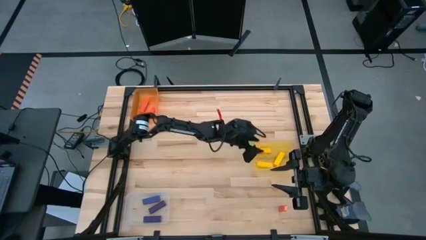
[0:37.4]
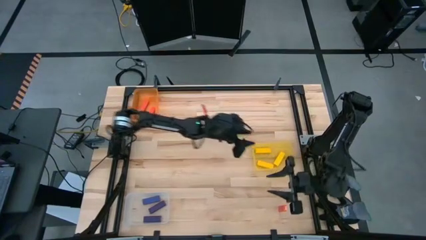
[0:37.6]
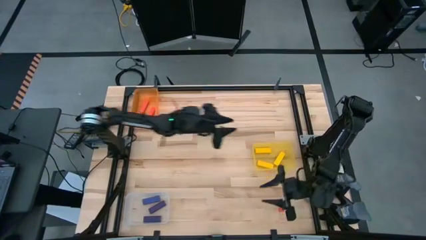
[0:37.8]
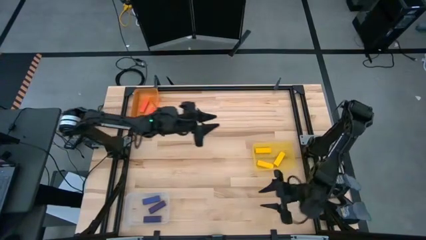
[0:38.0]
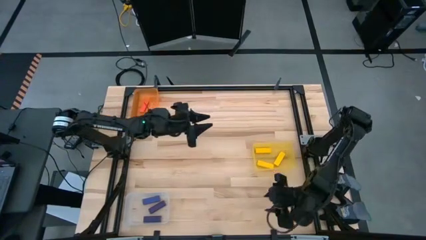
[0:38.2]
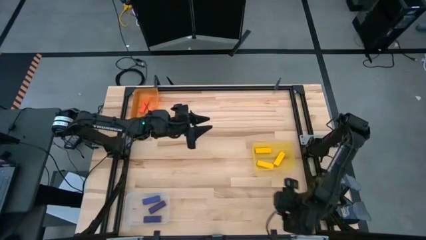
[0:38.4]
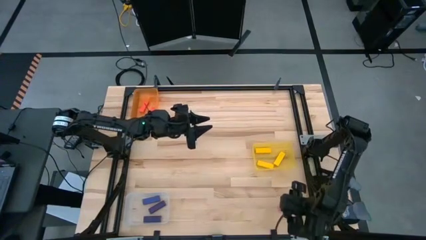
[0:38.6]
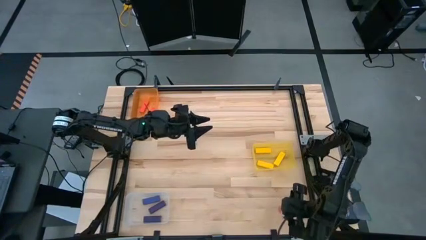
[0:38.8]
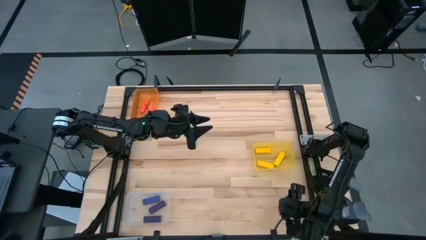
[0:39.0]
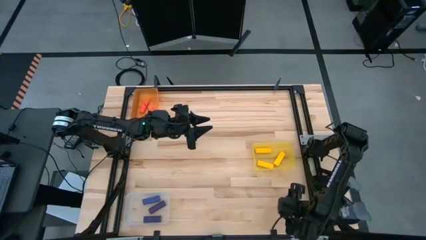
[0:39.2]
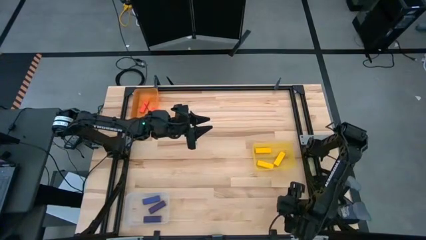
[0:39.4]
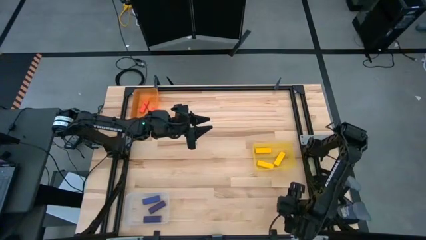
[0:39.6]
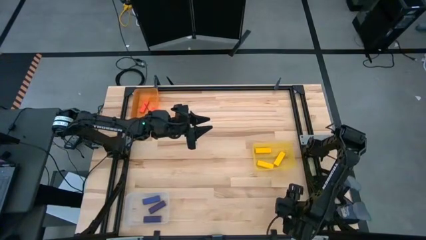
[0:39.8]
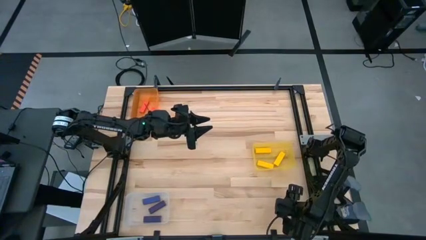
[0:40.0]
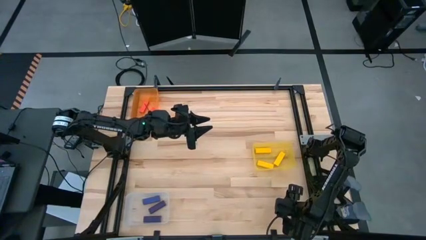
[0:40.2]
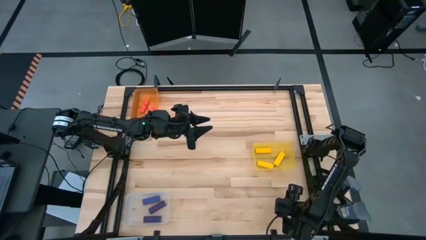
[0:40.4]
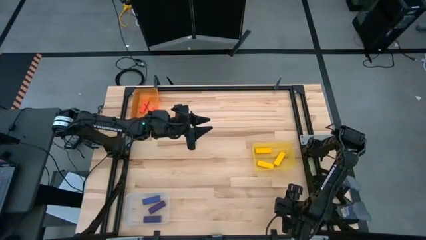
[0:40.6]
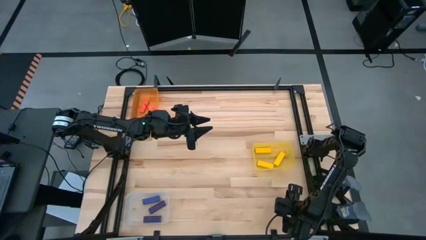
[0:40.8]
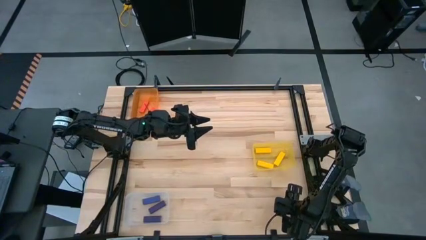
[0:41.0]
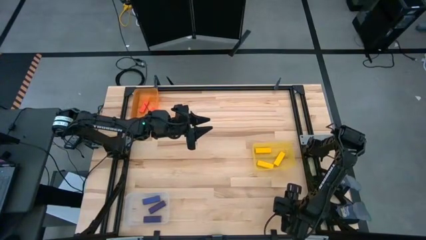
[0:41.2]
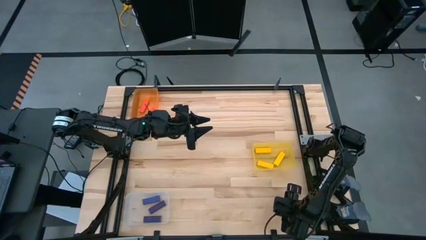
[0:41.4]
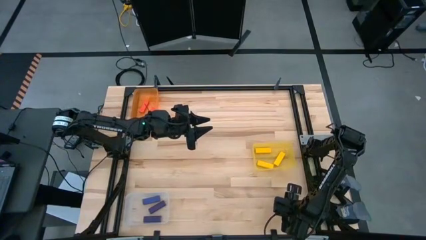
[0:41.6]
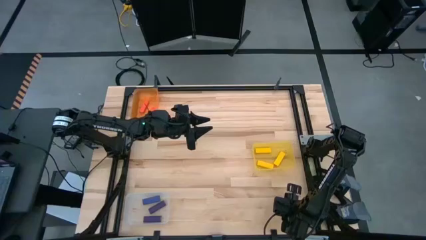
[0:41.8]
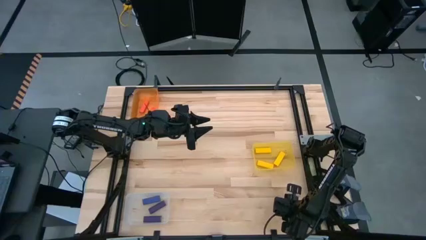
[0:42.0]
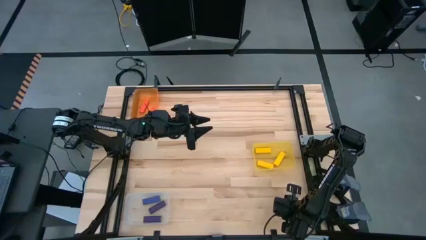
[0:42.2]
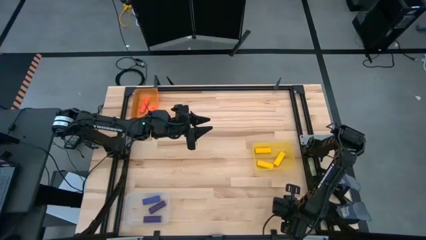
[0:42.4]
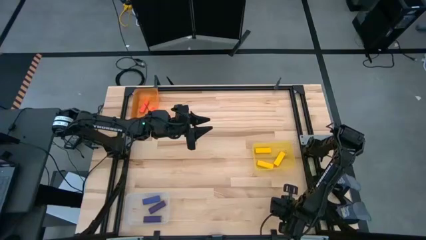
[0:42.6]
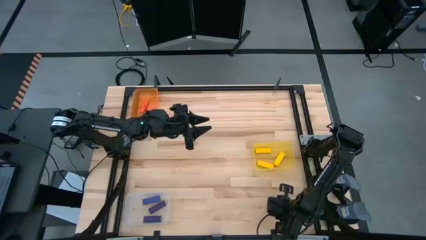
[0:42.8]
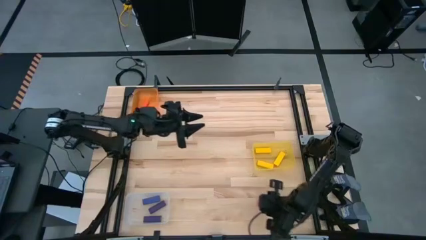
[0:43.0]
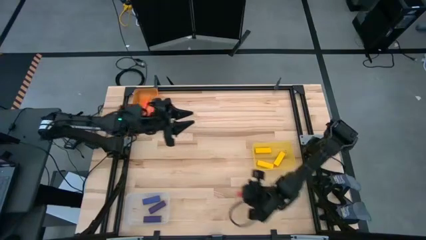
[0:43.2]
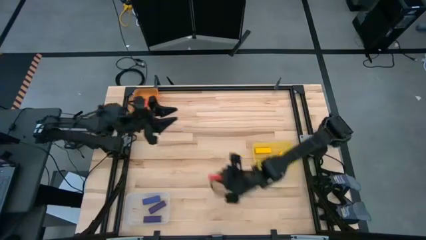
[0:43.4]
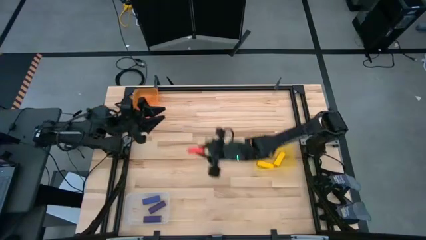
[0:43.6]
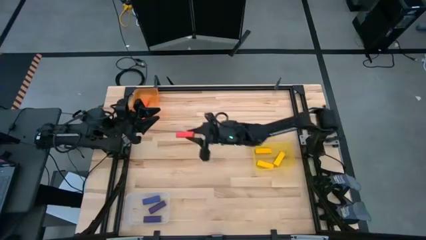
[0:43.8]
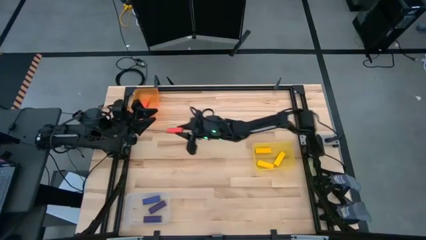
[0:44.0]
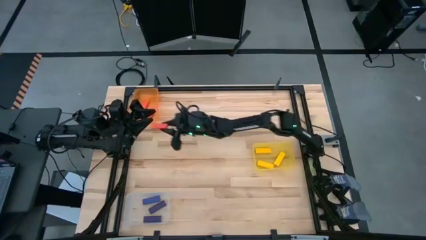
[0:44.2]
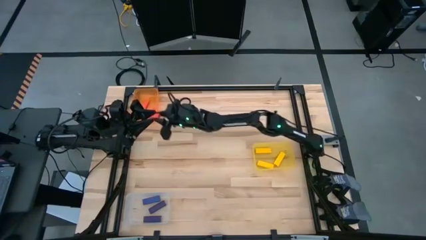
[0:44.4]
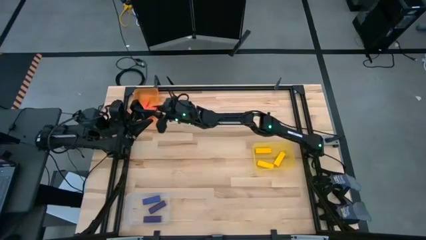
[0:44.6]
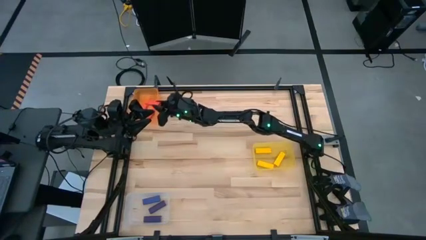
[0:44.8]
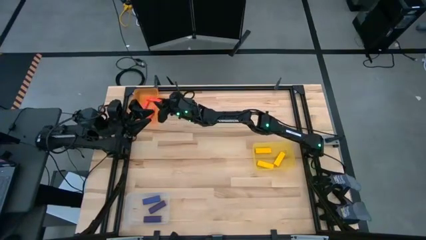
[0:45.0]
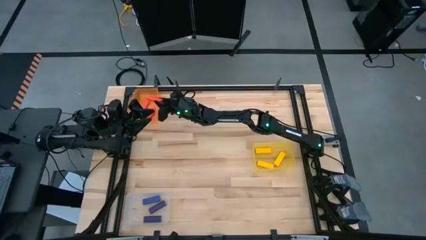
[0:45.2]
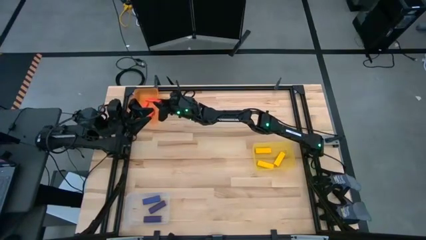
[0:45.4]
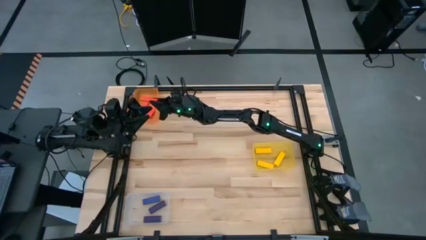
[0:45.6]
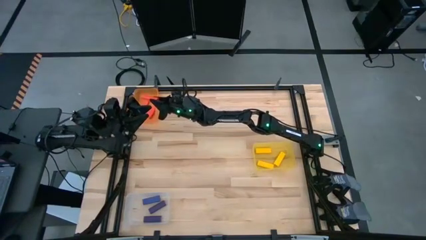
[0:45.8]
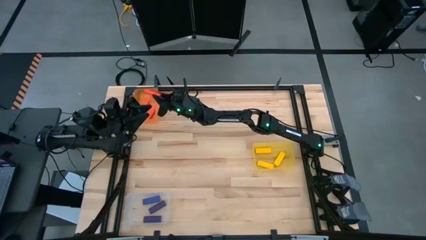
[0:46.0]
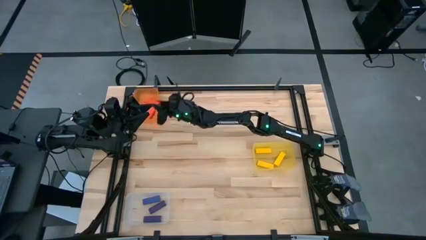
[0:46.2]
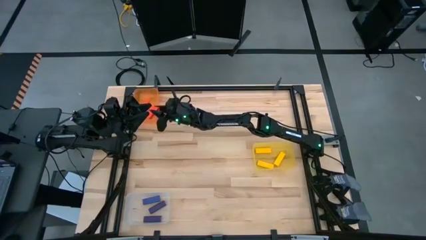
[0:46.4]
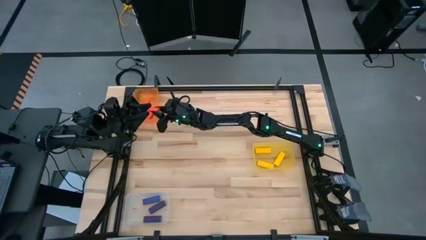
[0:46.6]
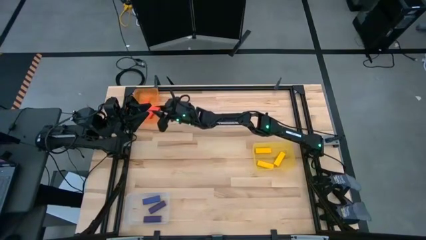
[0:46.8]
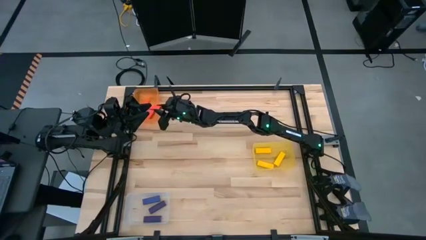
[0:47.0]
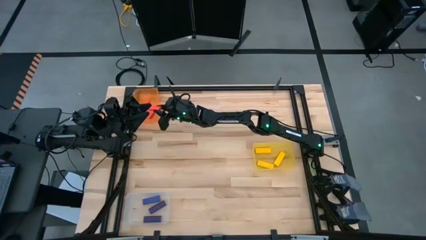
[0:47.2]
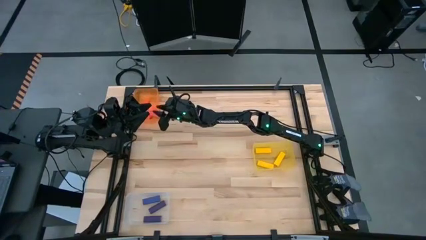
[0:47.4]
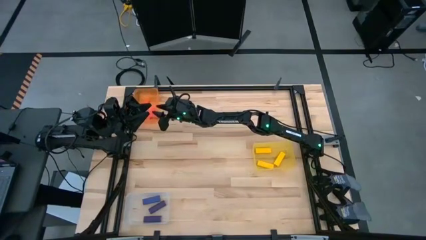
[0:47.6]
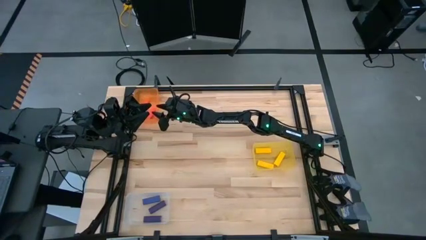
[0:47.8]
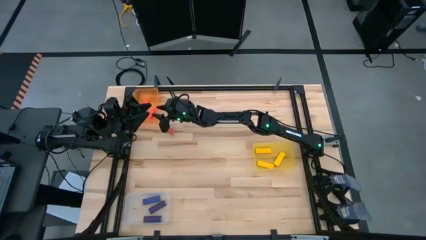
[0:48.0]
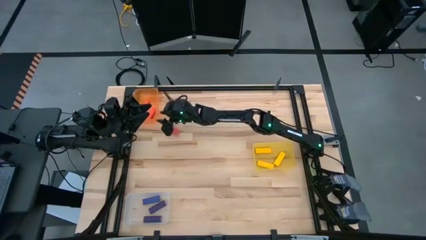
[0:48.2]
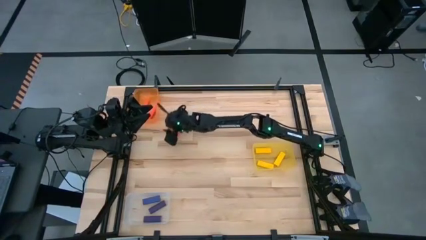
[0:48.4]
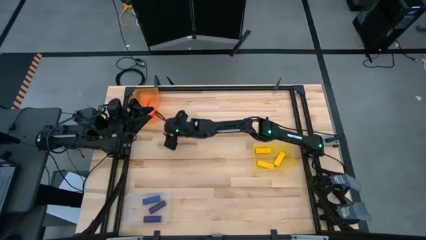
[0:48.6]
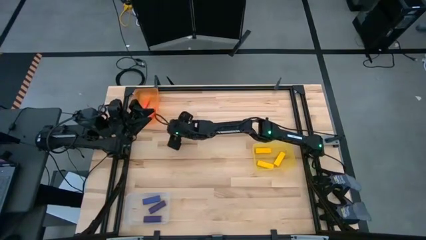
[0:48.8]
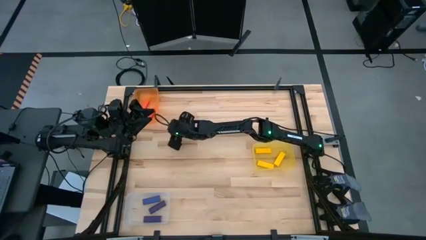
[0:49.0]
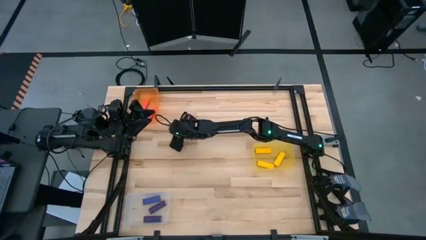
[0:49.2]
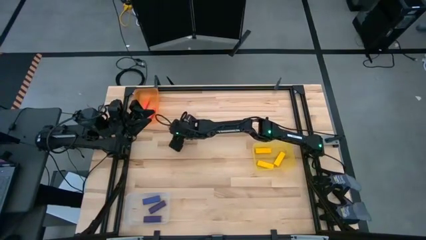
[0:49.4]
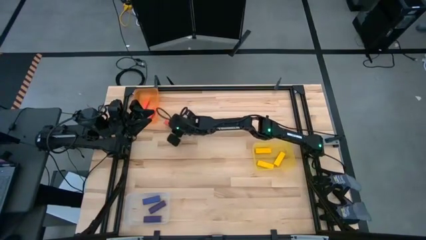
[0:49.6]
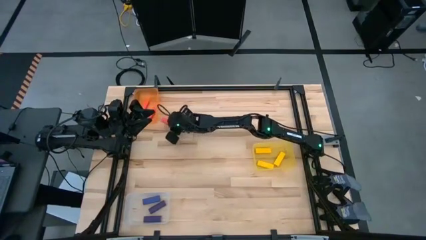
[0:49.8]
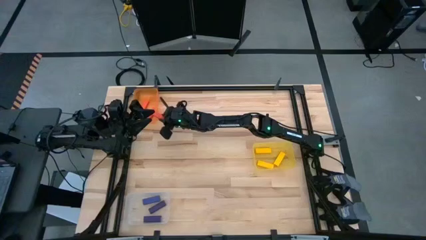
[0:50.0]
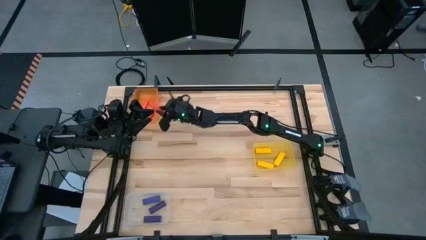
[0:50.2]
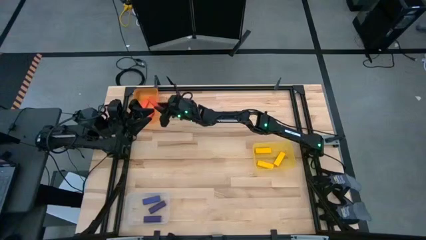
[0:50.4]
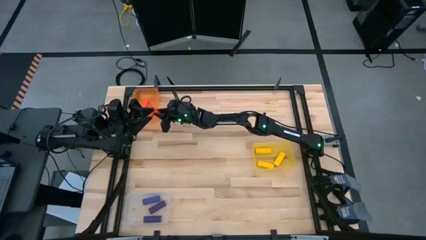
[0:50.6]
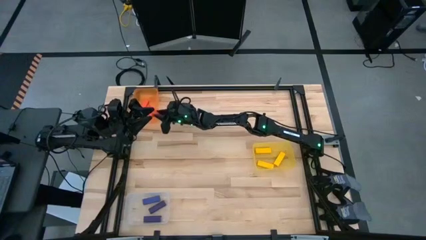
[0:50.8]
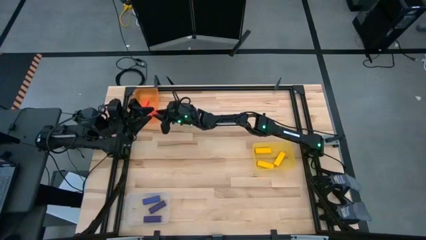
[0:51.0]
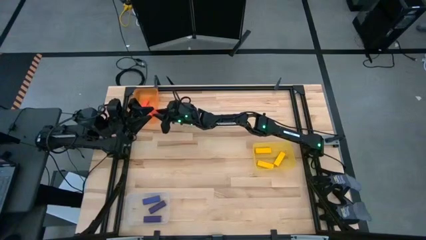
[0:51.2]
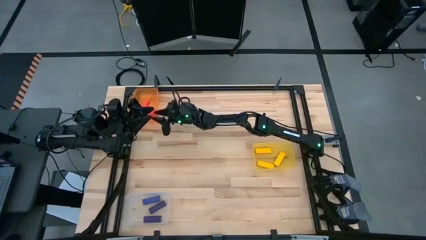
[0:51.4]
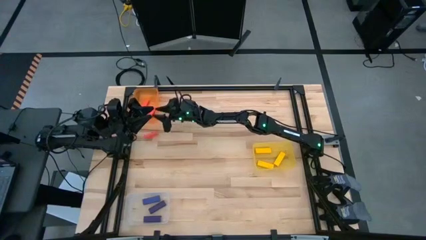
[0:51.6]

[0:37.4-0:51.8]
Task: Sort blocks
Put the orange block into the orange transparent bin

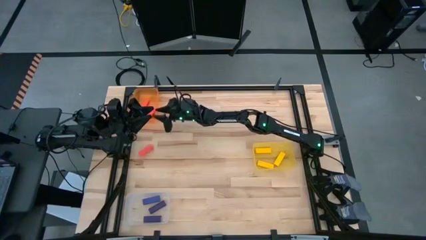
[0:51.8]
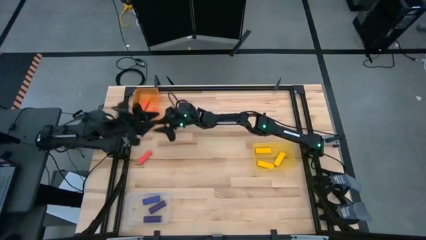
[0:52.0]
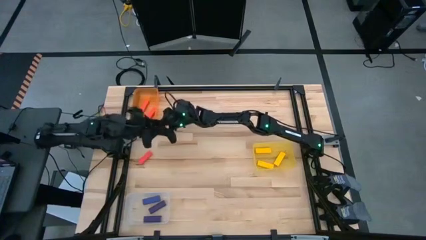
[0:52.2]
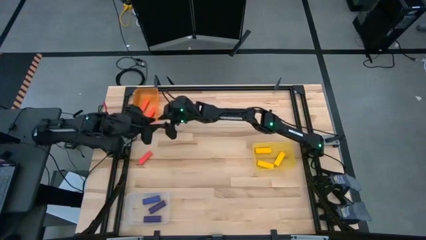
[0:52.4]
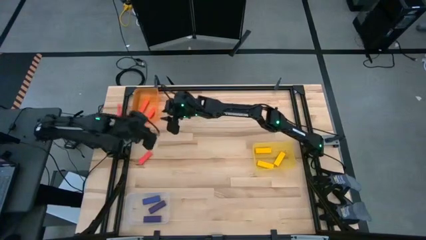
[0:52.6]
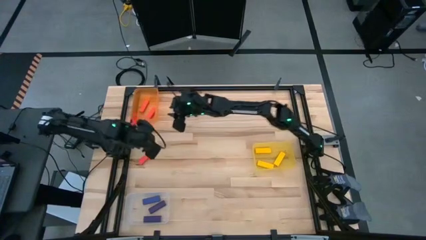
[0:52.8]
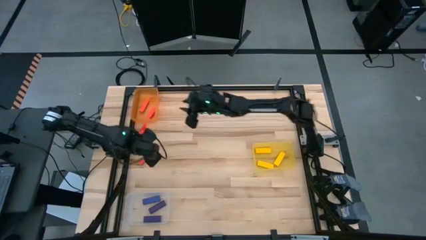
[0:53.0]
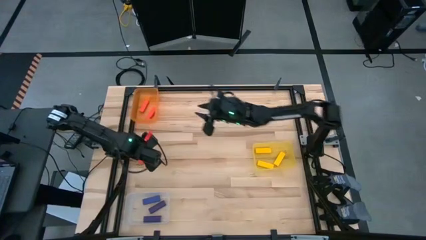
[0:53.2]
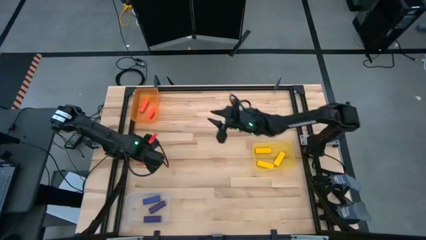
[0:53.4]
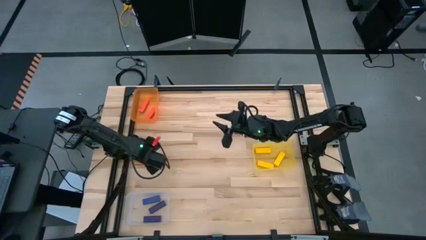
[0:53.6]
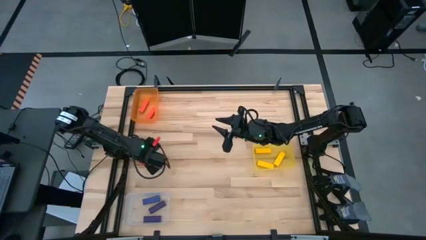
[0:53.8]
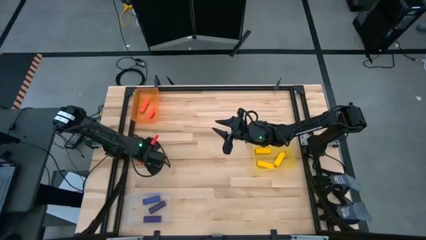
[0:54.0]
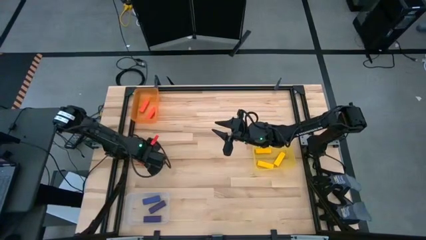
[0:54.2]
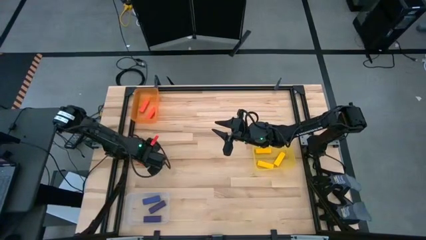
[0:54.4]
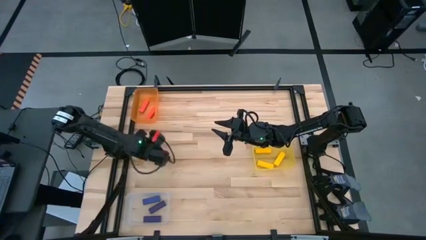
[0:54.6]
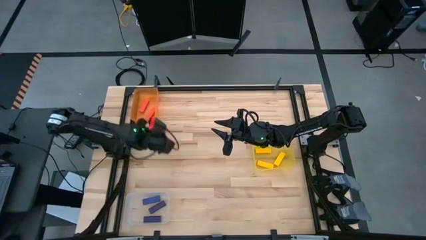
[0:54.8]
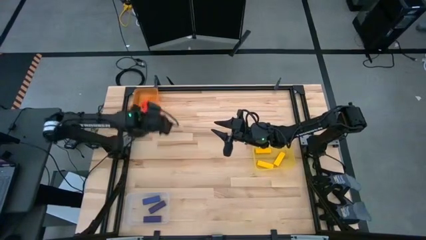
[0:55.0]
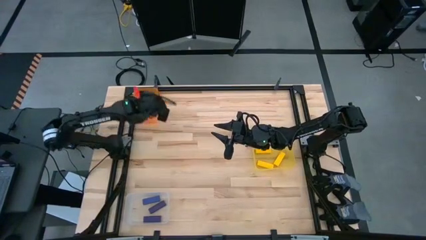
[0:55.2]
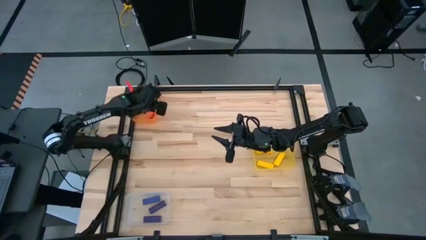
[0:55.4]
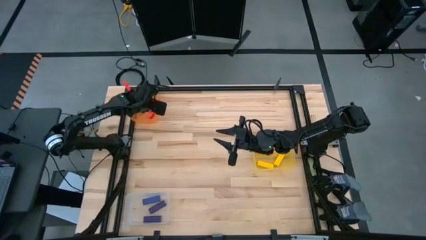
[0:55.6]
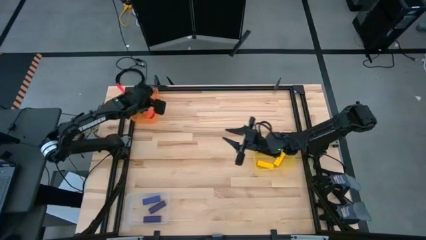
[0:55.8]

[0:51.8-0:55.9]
Put the orange block into the orange transparent bin
